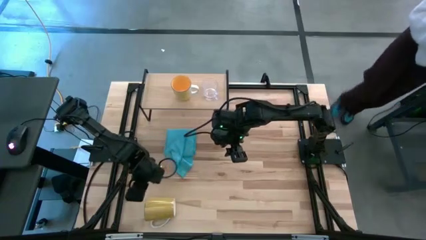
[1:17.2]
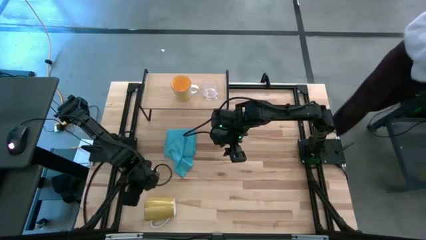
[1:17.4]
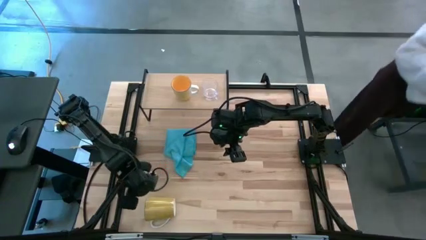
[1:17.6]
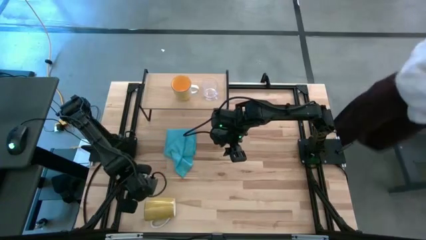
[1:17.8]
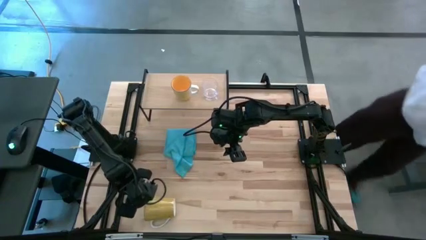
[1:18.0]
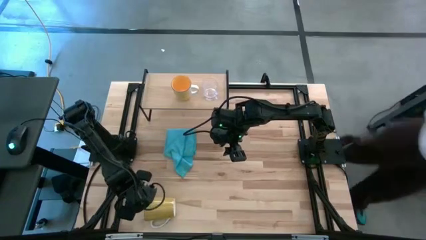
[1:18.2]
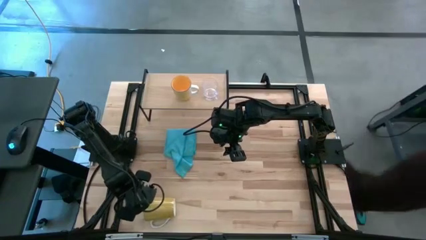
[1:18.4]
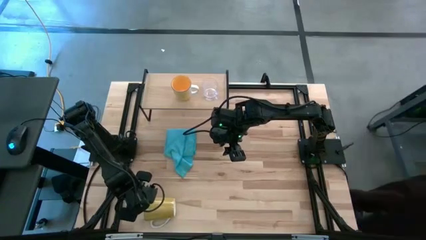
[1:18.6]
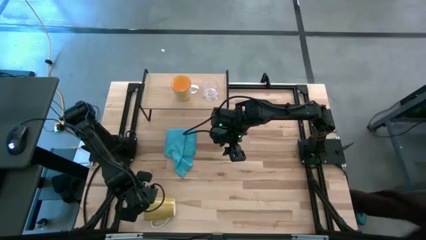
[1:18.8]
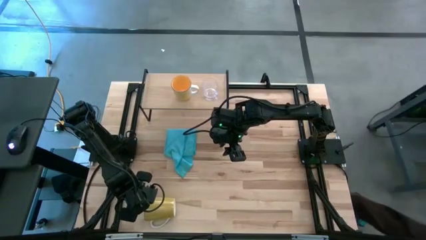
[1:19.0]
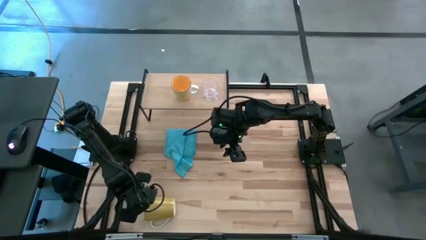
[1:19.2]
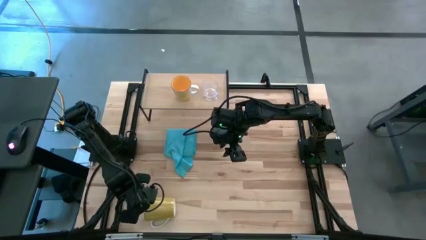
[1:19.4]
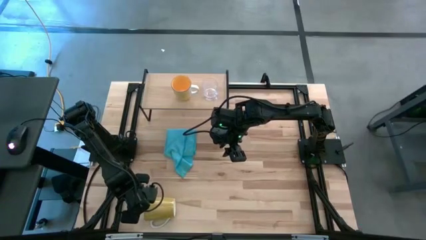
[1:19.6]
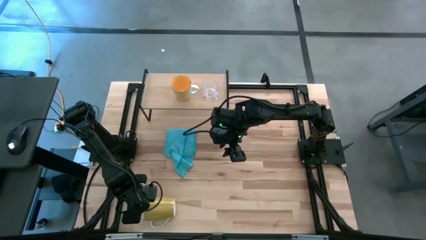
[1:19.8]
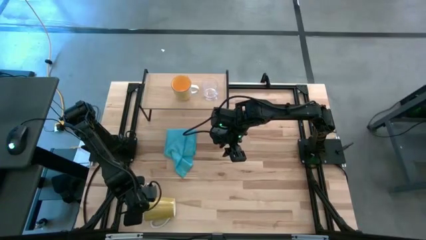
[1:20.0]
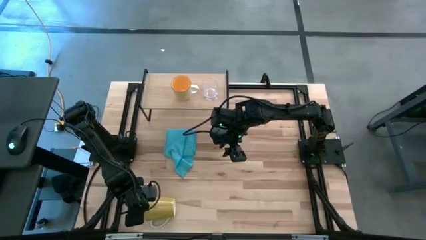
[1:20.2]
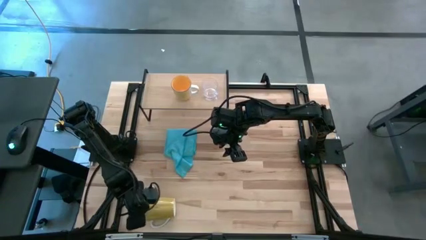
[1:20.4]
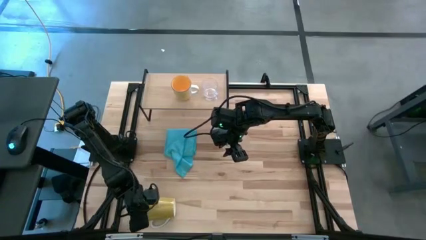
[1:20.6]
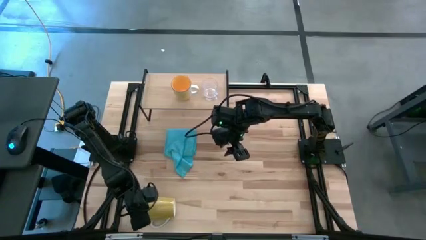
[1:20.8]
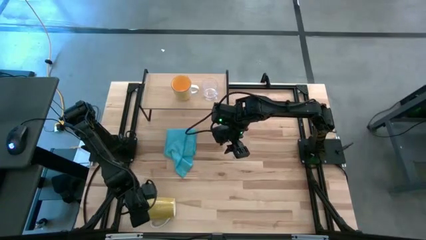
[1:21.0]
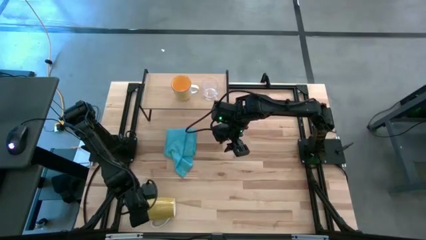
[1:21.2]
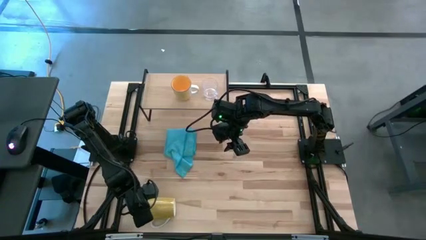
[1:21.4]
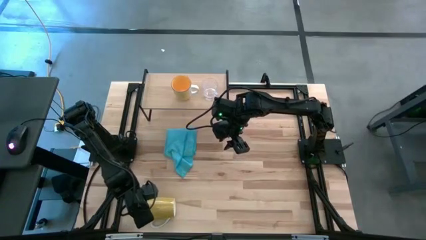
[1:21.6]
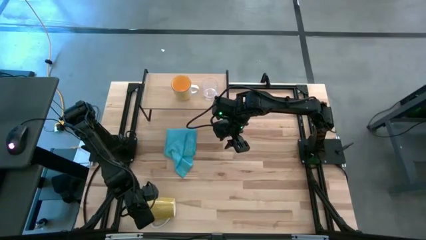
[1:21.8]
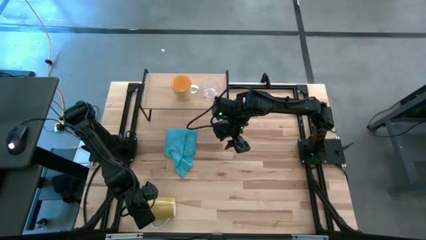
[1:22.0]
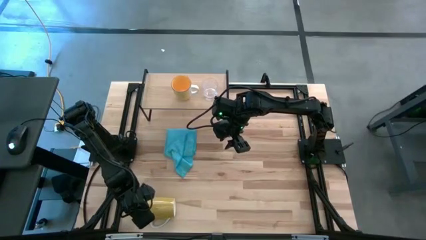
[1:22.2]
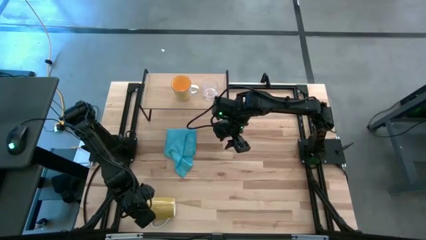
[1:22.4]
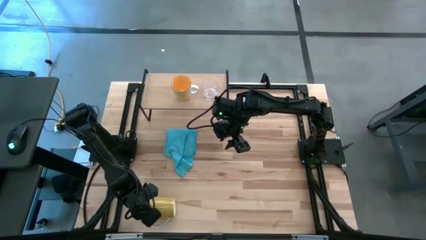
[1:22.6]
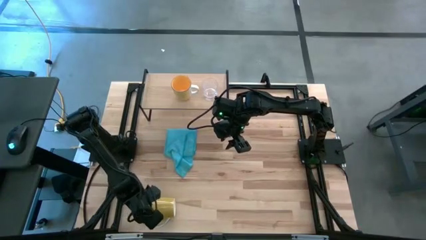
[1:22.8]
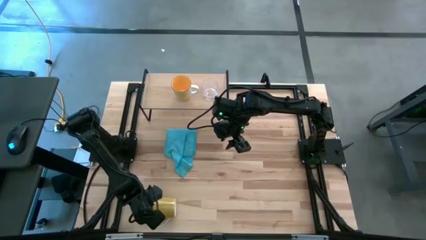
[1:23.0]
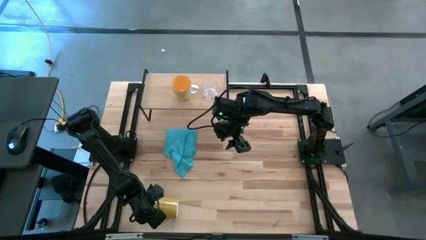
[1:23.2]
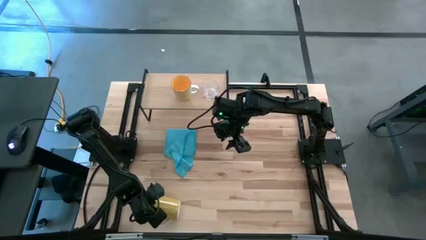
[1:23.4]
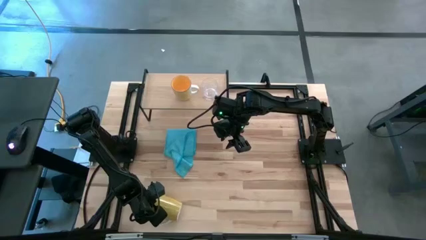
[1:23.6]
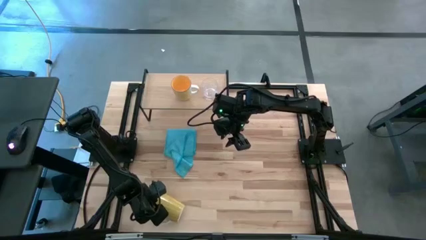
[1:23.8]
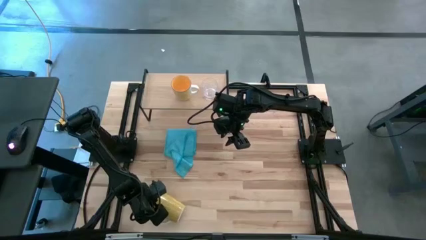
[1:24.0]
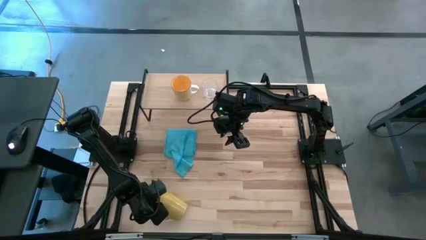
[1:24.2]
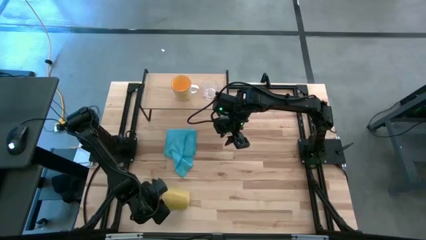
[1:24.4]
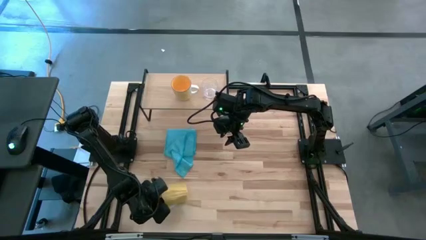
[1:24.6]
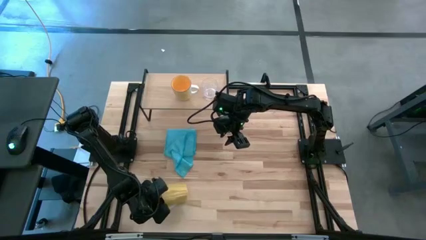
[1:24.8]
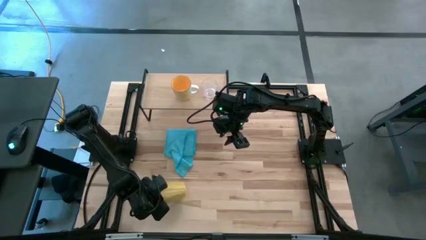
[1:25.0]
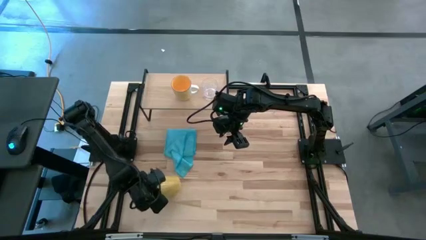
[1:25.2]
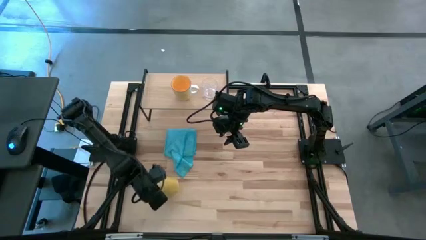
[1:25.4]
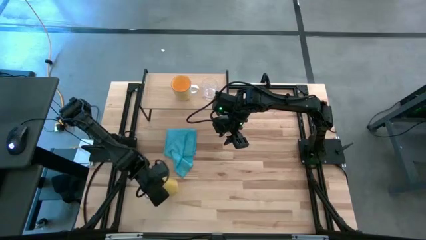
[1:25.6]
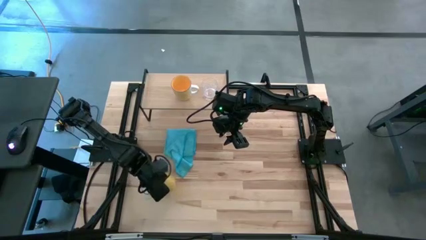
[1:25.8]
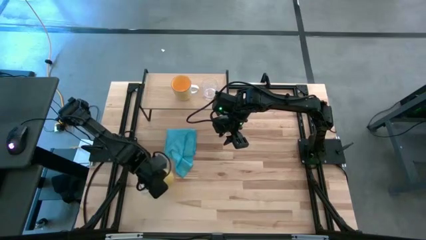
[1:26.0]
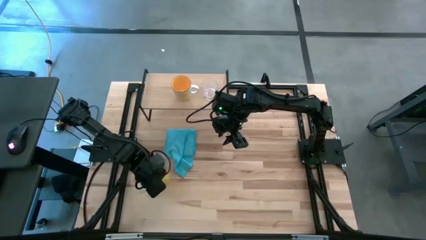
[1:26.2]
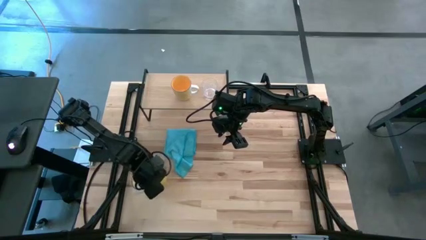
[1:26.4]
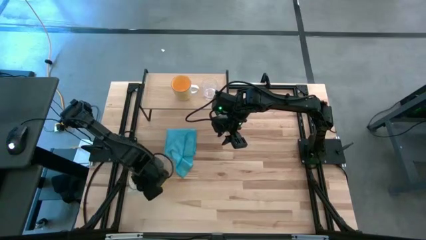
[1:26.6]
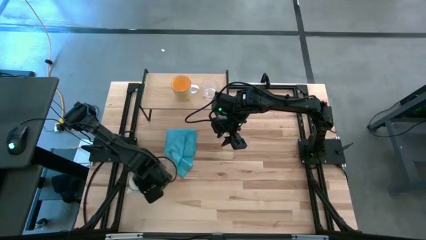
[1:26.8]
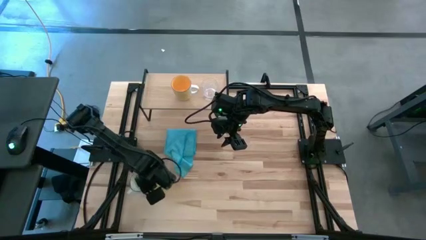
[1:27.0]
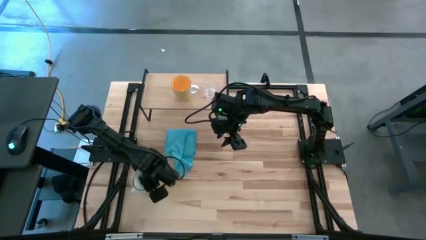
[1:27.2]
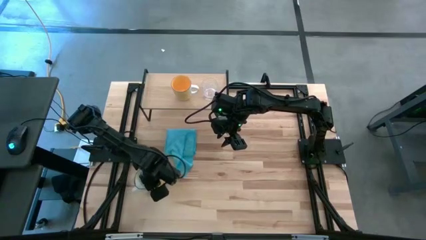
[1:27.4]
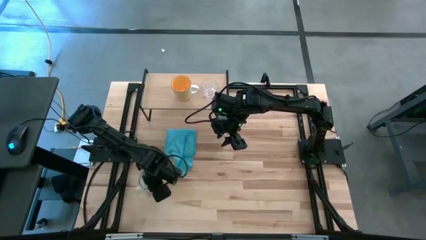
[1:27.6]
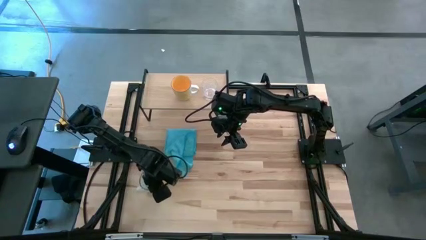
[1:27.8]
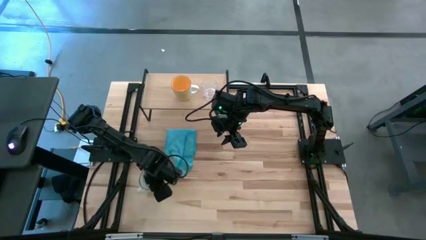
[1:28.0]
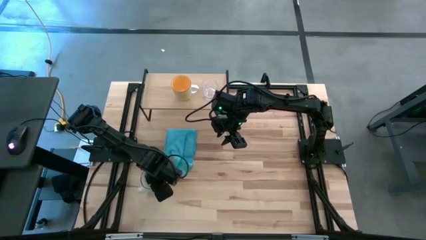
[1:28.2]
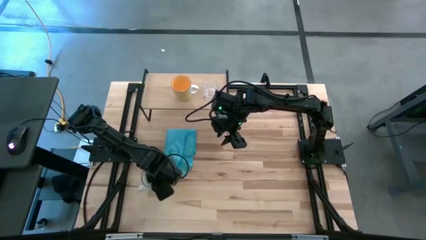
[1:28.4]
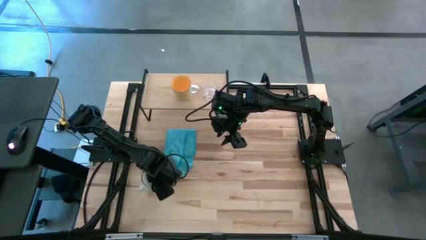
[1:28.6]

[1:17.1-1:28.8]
Task: Stack small to large cups/mugs on shelf
Put the white mug on the shelf

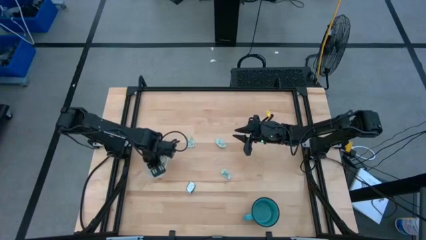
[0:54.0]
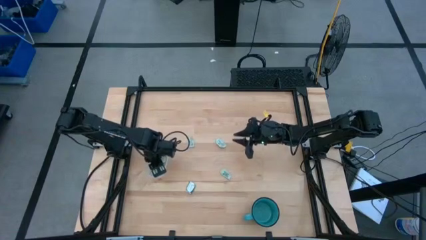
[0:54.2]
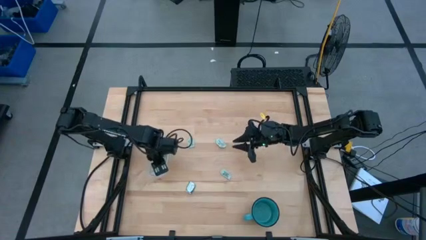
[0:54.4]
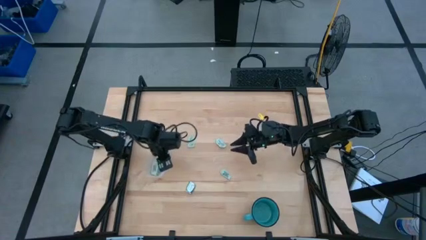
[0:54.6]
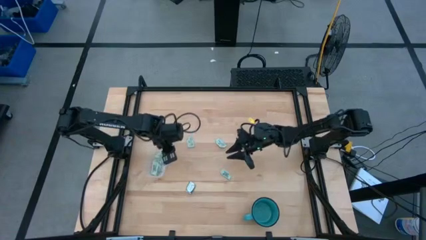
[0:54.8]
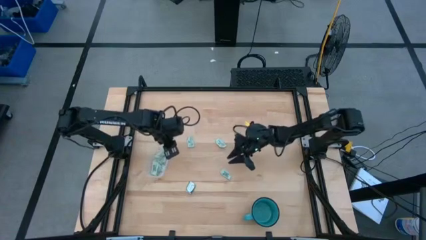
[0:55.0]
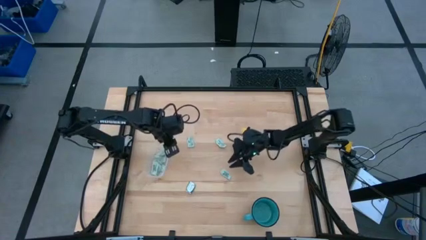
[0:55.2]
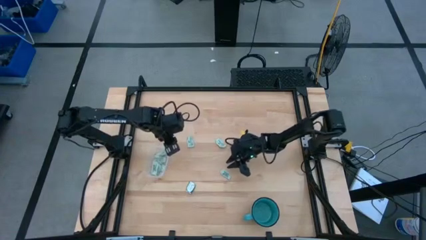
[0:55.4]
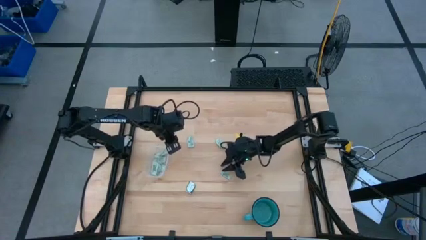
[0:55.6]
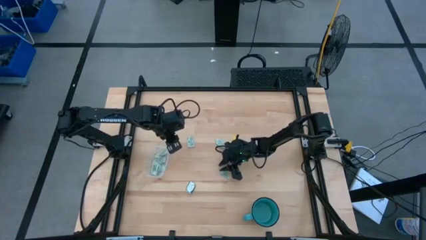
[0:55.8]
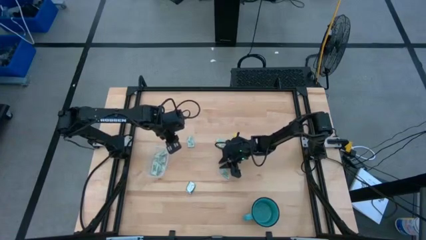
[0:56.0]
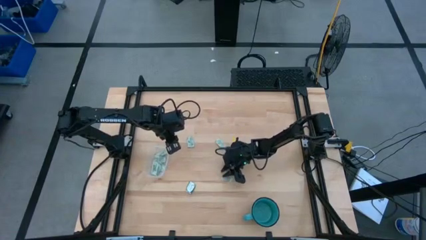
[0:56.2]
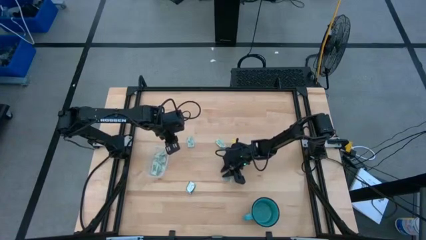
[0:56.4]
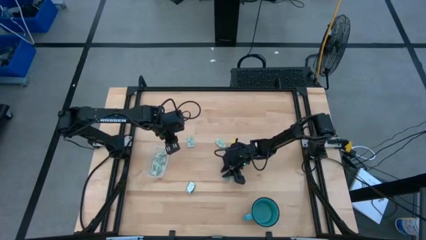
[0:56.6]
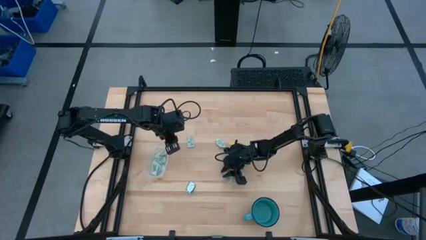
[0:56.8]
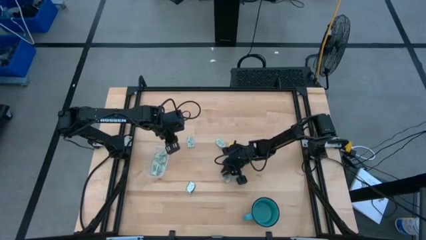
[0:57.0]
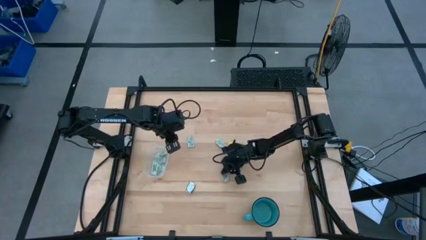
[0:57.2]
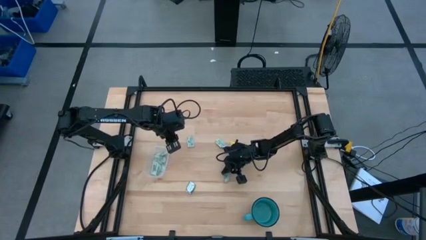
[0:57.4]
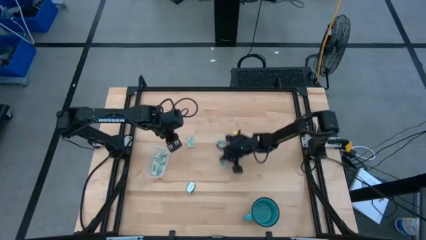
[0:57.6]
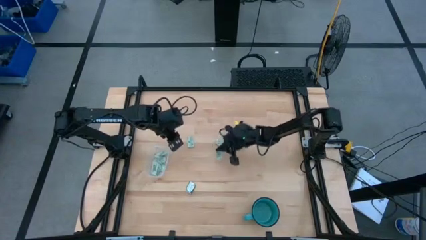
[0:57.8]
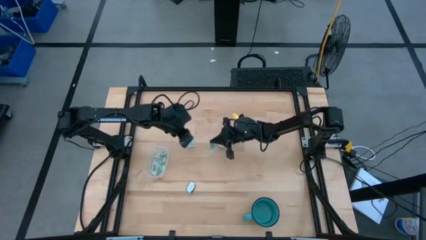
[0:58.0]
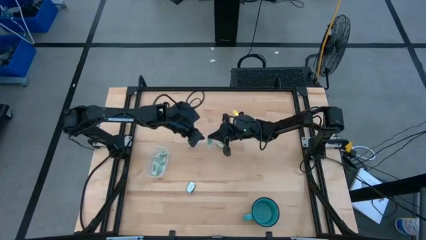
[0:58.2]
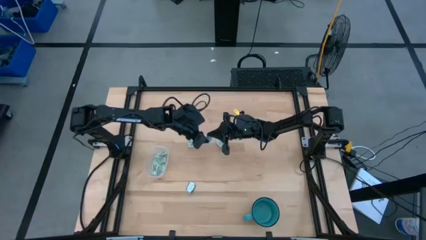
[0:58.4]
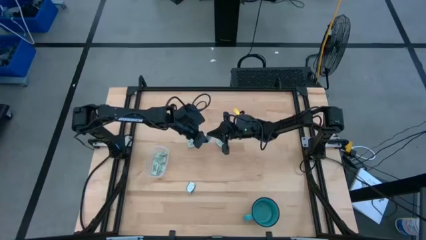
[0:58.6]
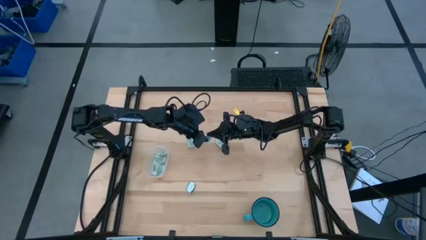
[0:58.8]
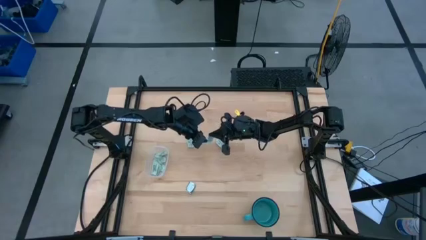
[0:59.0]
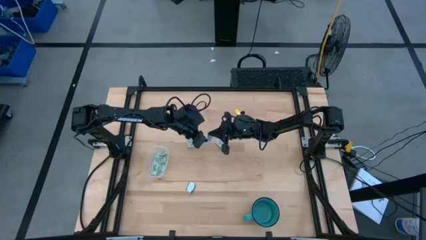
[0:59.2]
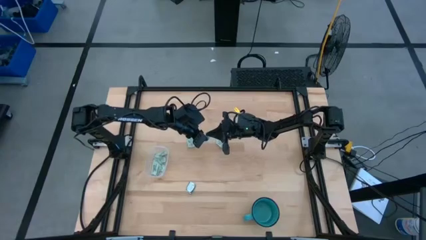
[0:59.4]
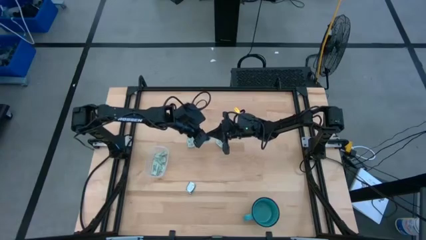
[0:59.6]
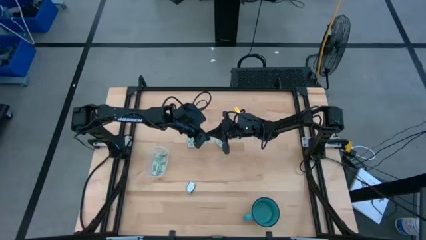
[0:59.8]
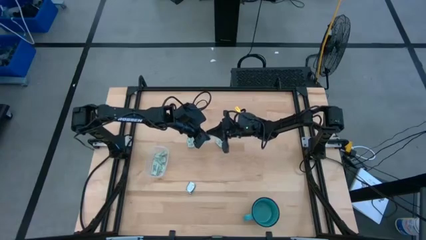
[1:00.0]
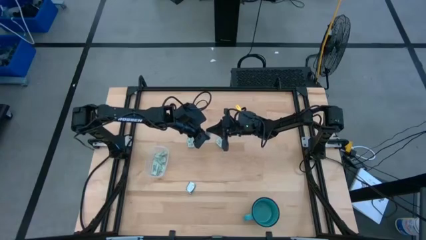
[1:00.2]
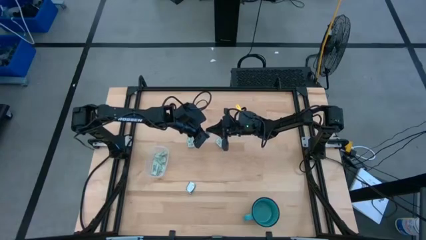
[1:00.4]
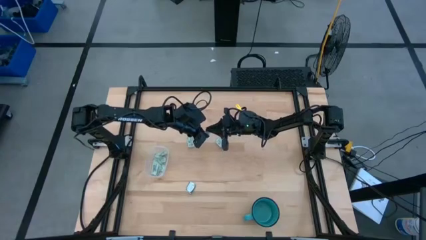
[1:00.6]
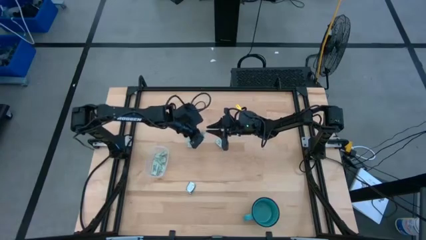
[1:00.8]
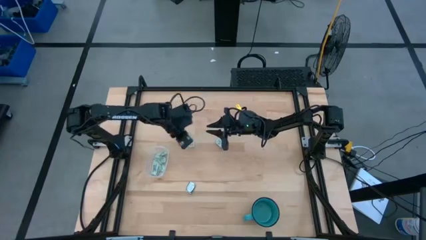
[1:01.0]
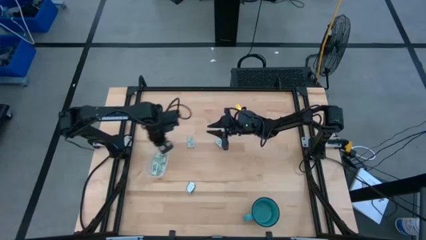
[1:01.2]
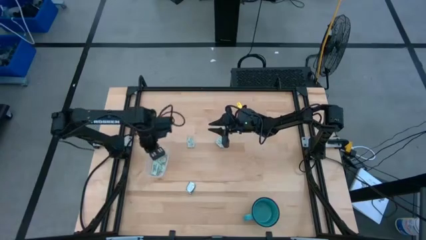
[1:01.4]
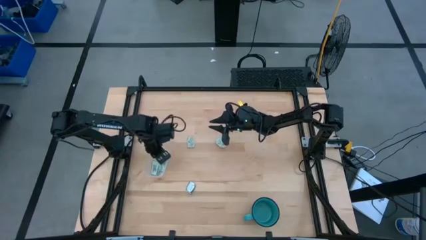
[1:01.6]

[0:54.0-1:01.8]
Task: Pick and place Stevia / Truvia into bins
Put the light green stevia packet into the transparent bin
